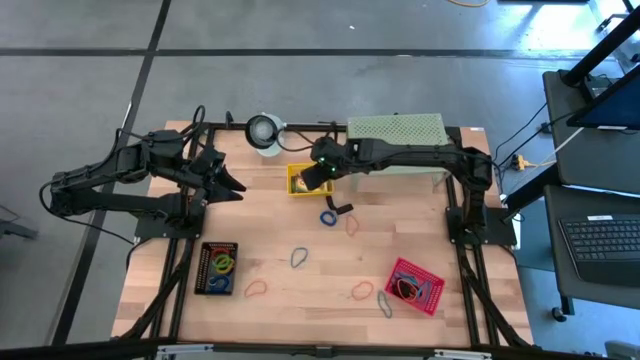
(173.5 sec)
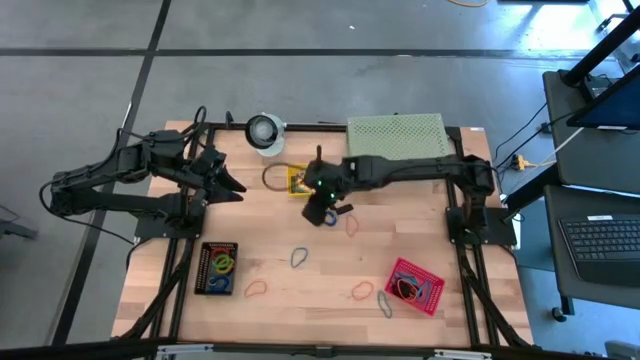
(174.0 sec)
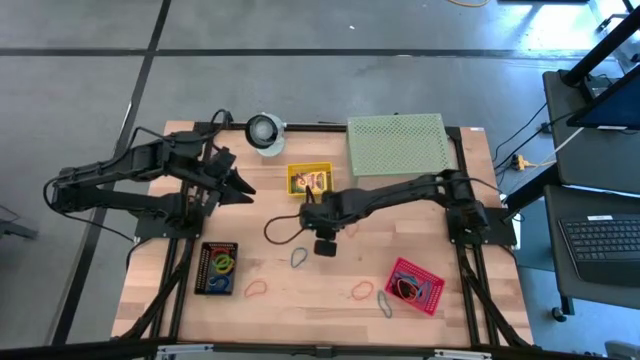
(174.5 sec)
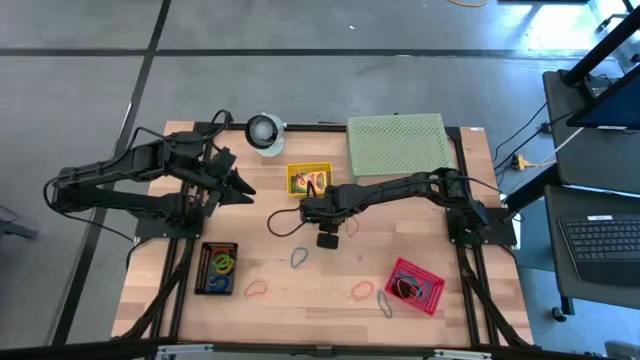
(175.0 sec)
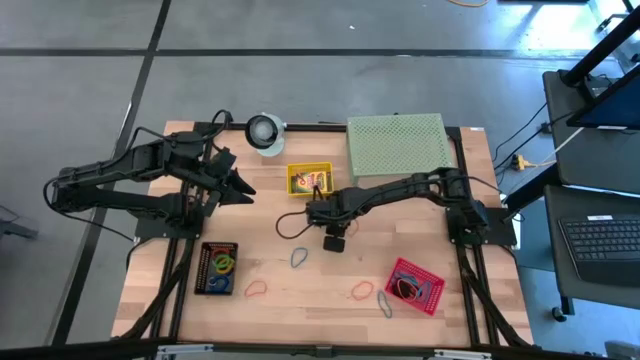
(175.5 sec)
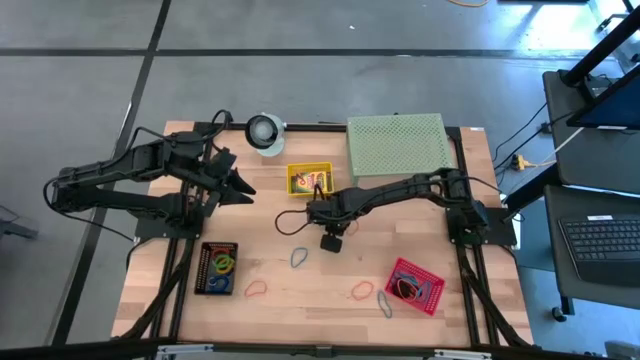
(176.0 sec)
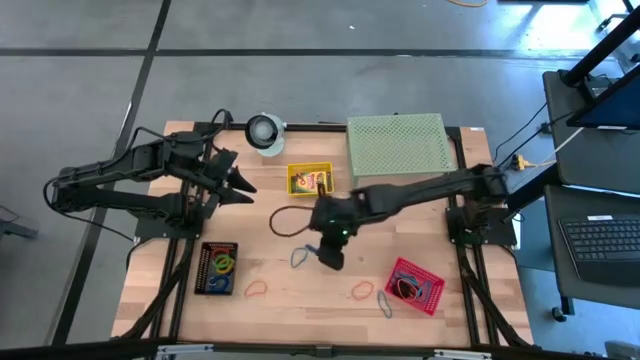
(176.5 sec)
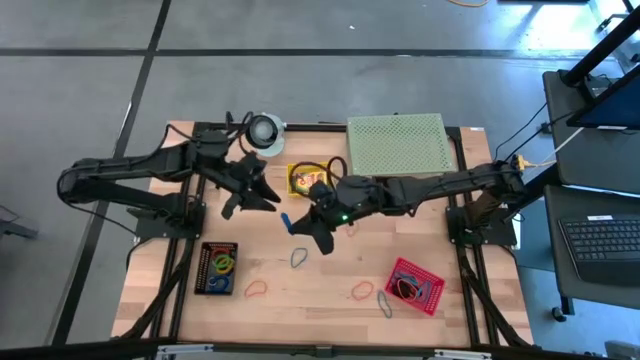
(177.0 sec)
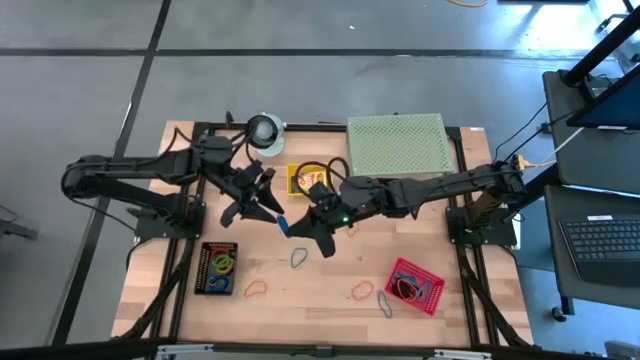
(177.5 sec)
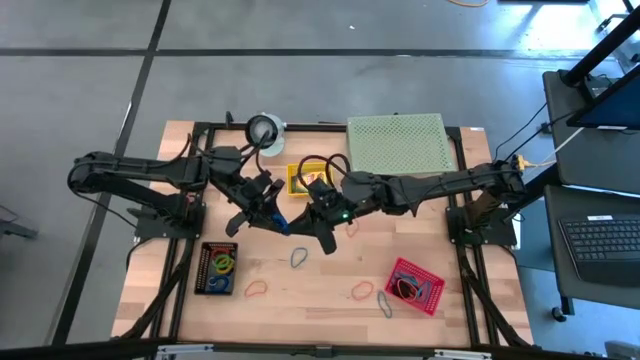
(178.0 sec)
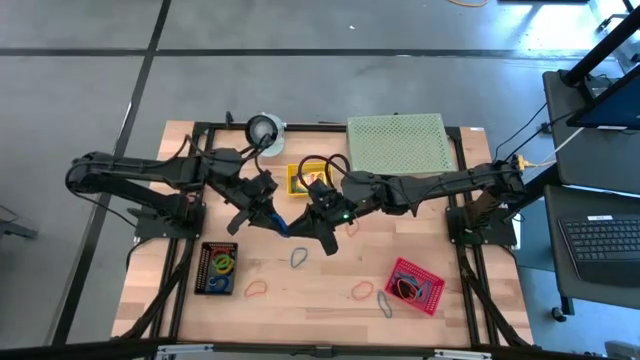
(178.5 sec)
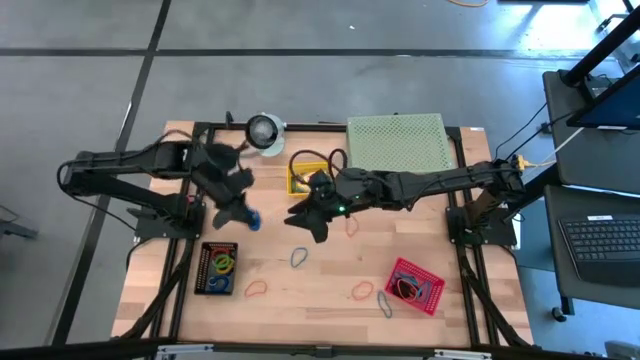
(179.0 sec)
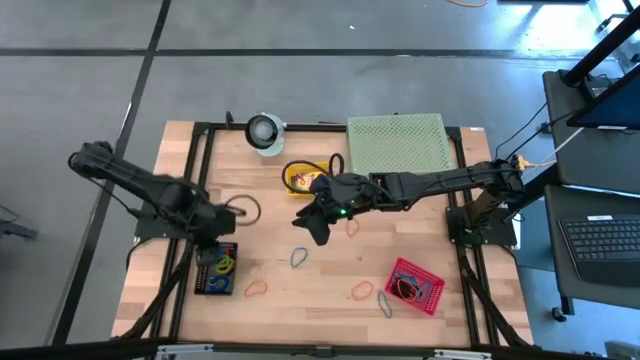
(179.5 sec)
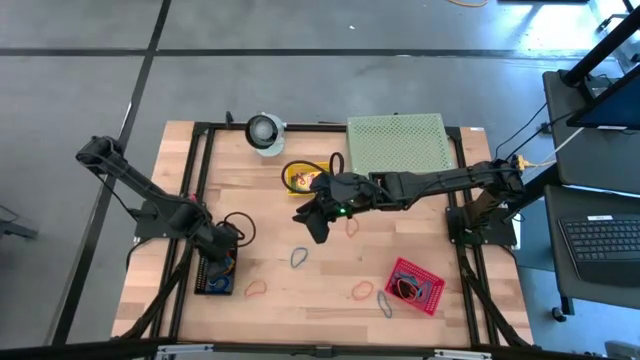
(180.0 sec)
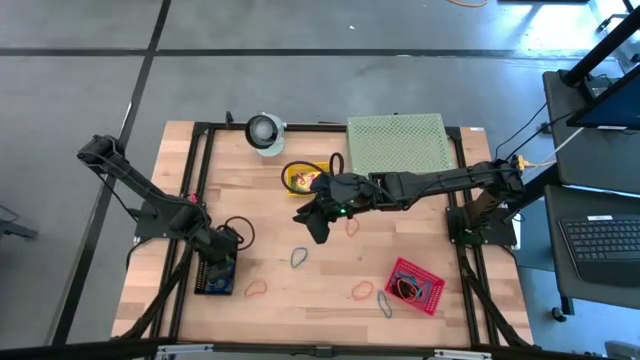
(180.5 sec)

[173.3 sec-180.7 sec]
Task: Pick & Place Office Desk Supplies
Put the blue spring keychain into the black bin

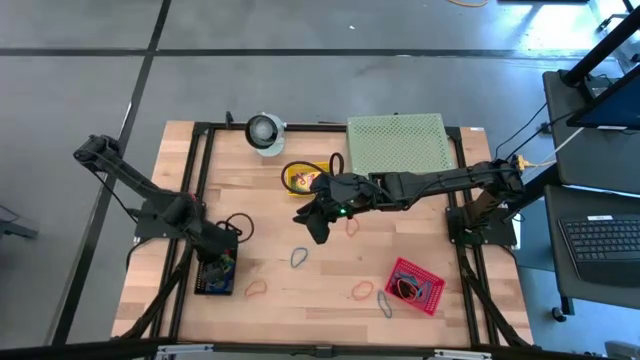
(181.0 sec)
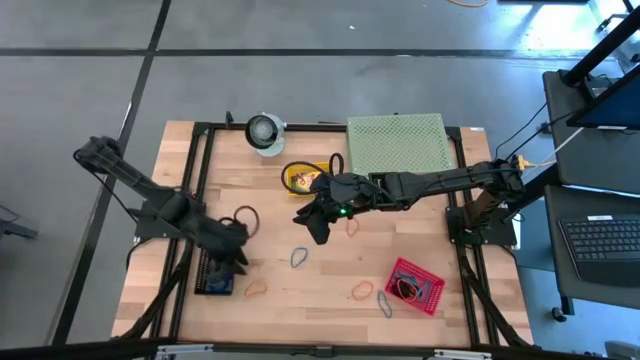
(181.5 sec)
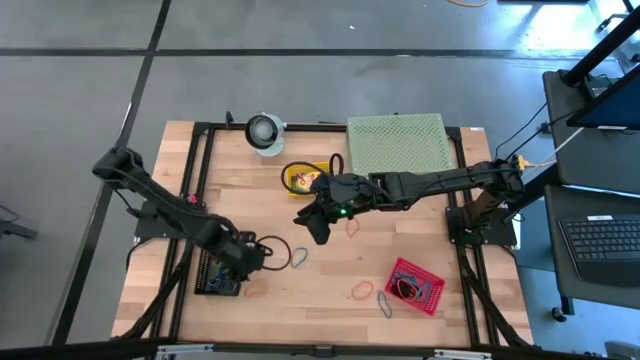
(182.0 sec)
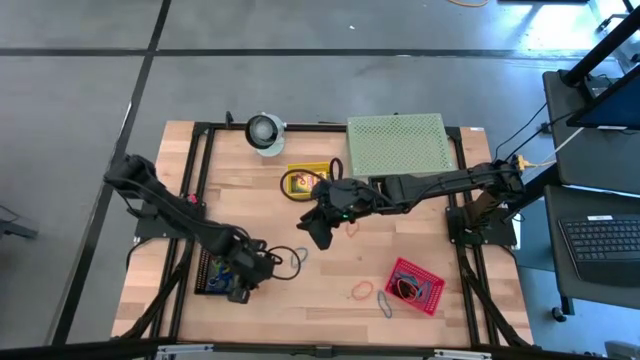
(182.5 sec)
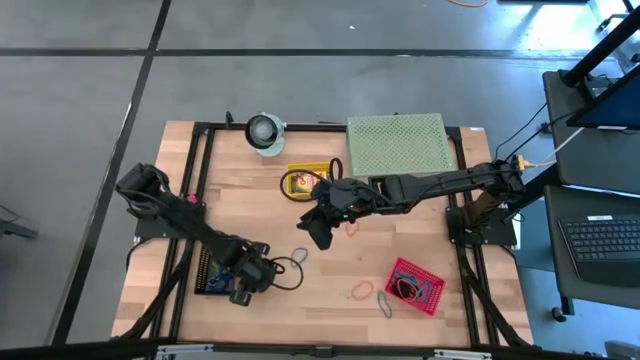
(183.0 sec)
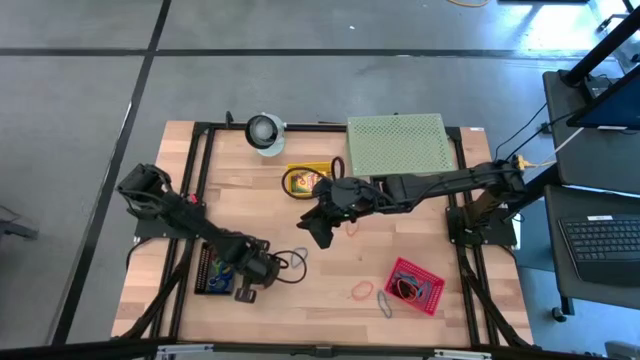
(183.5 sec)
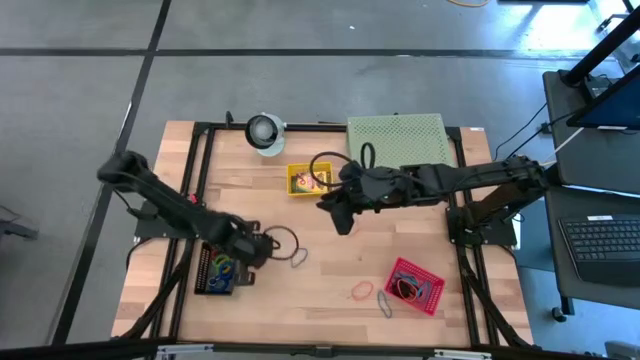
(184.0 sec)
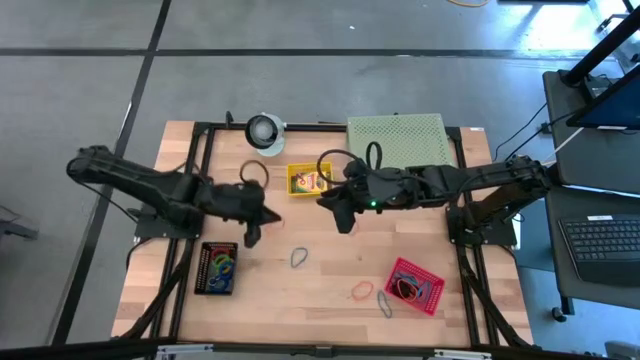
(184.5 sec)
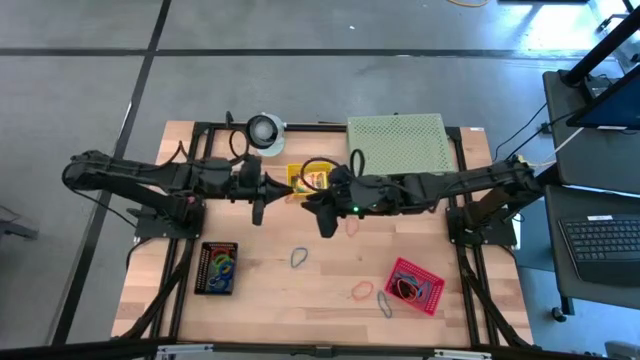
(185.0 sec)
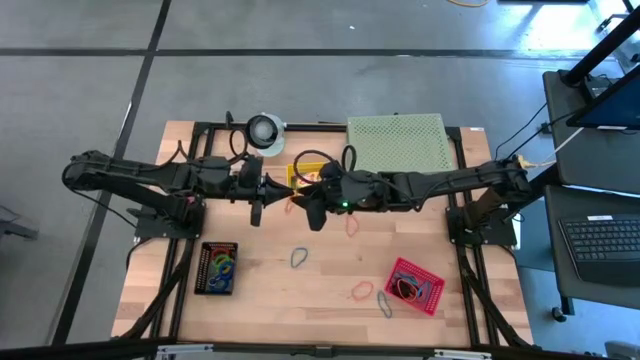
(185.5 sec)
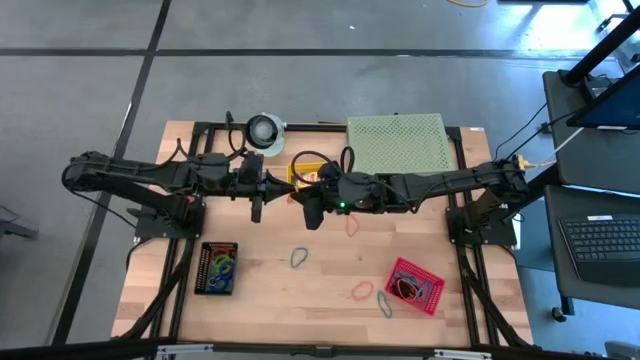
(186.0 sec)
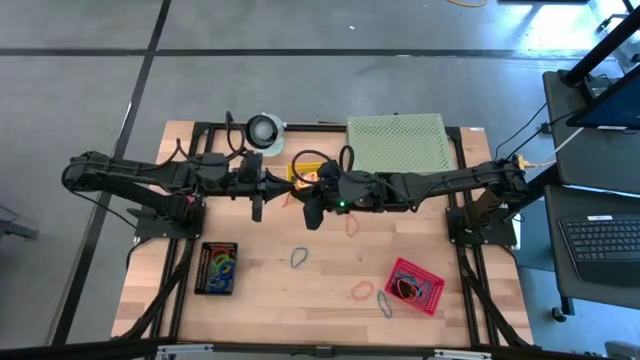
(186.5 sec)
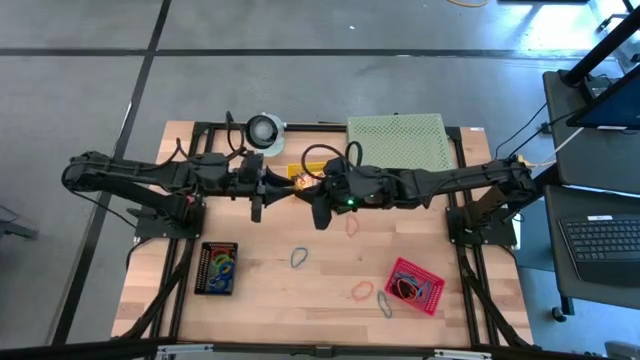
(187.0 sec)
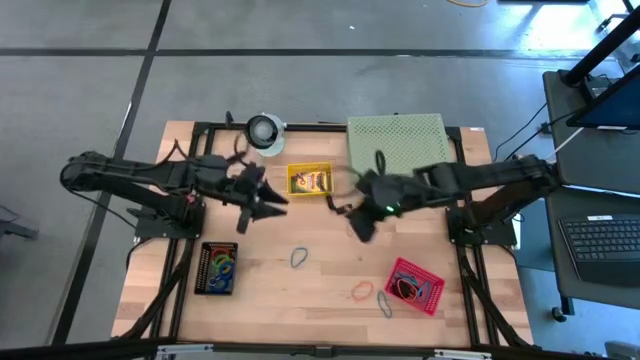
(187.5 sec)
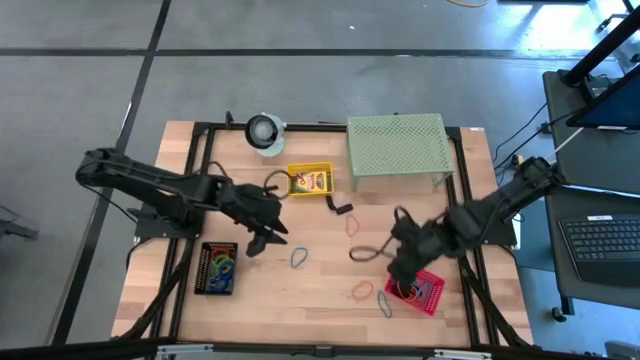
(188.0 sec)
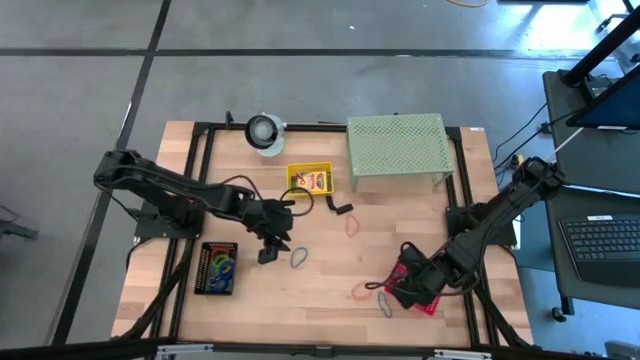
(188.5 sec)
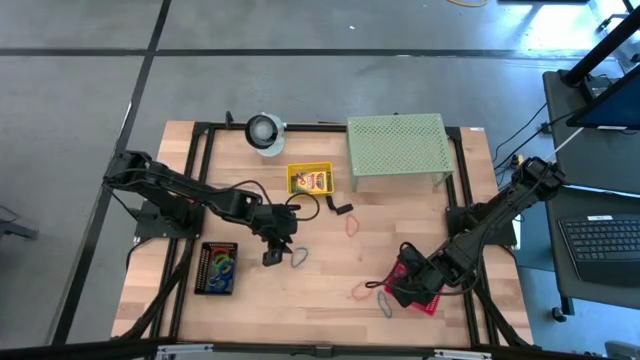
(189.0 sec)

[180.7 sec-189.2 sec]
Put the orange rubber band into the red bin

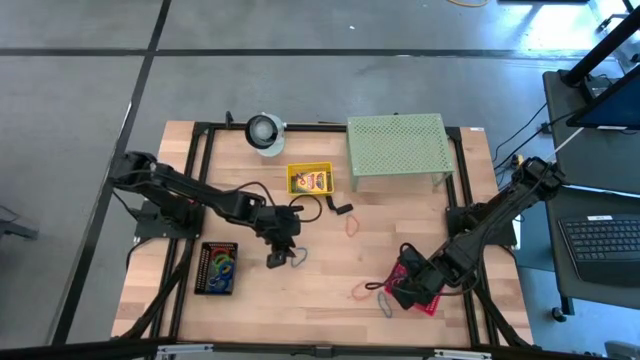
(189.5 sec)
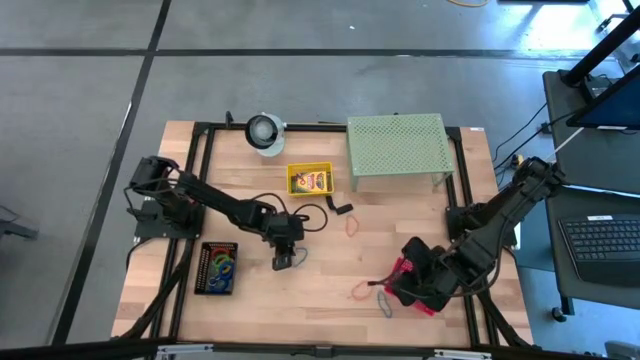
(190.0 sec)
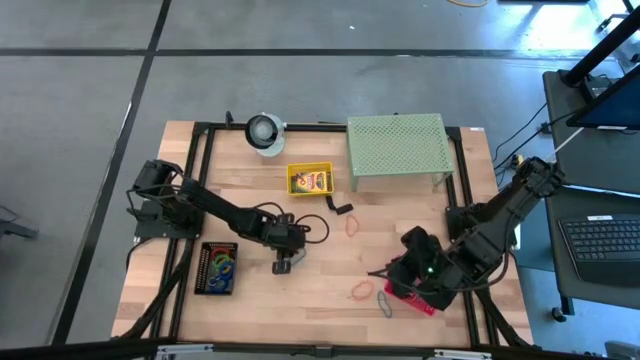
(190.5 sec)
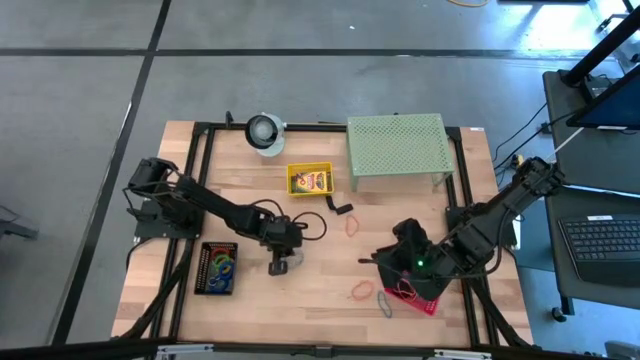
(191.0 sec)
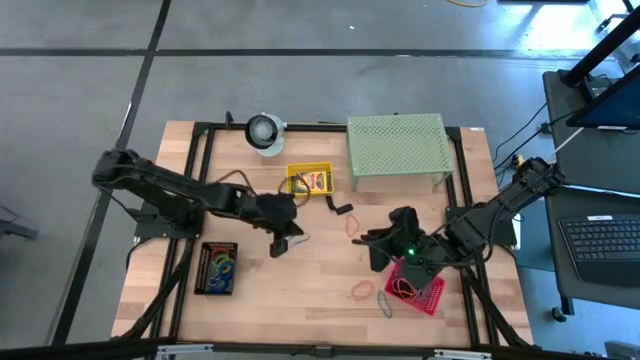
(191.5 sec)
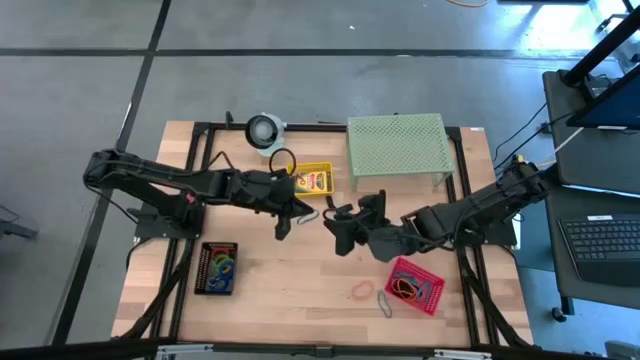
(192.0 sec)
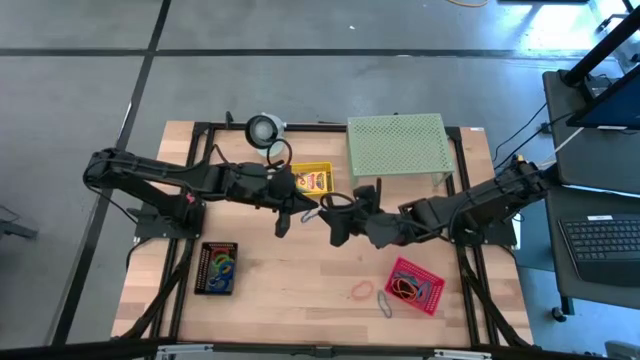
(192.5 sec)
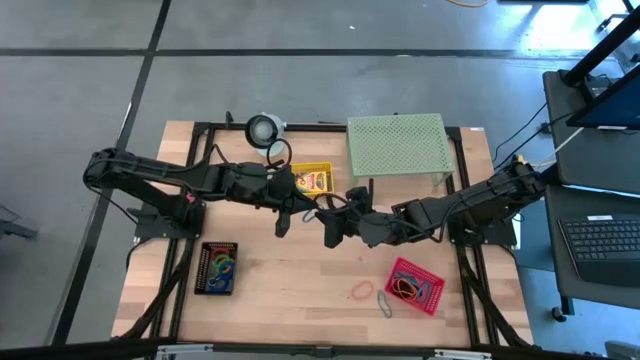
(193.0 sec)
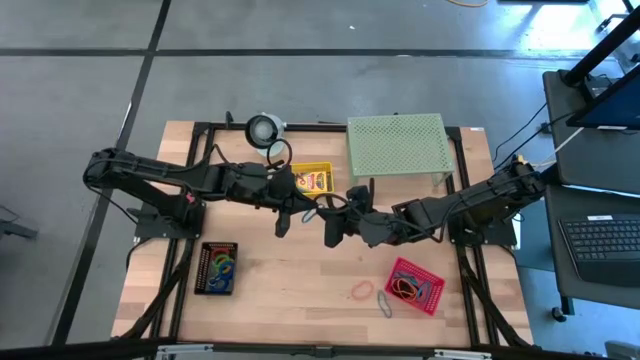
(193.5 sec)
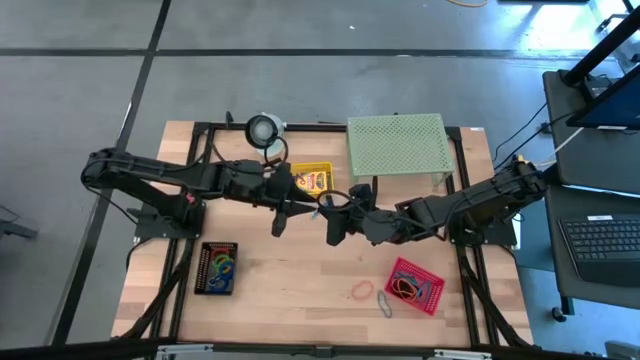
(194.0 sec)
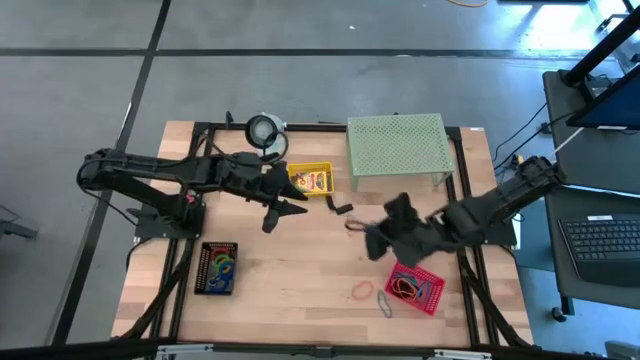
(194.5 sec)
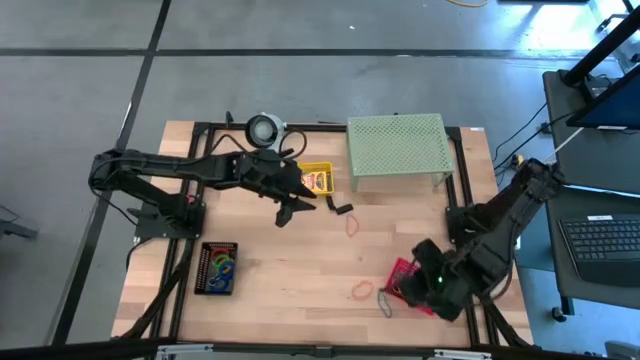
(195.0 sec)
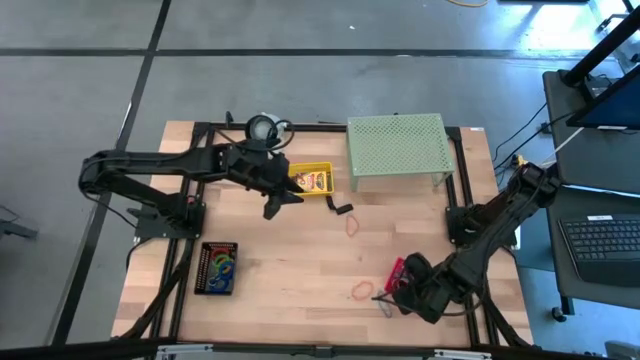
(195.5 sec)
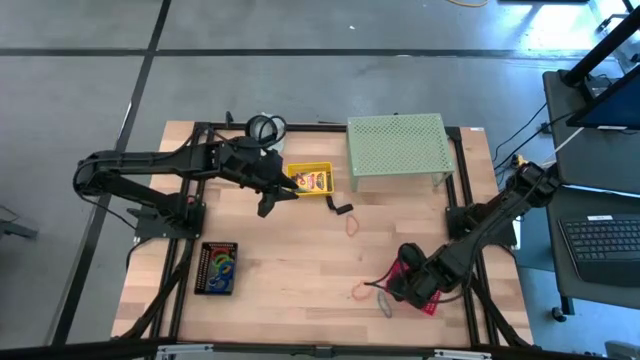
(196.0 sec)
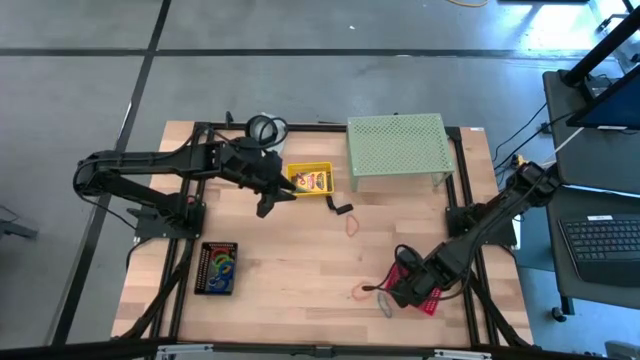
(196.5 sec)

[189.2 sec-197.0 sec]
Put the blue rubber band into the red bin
